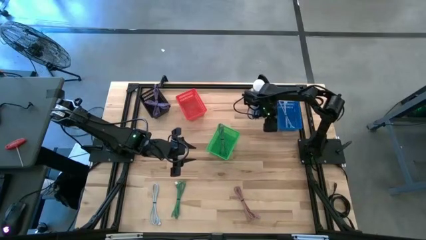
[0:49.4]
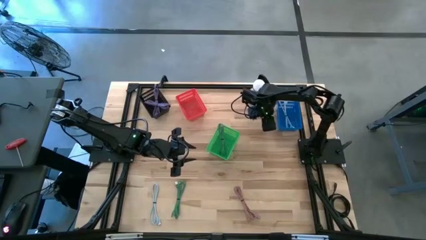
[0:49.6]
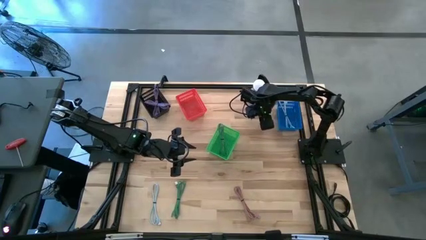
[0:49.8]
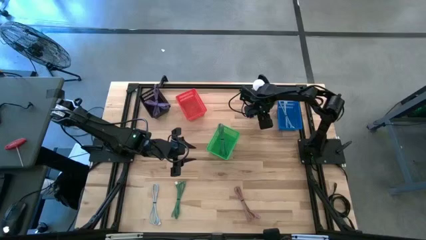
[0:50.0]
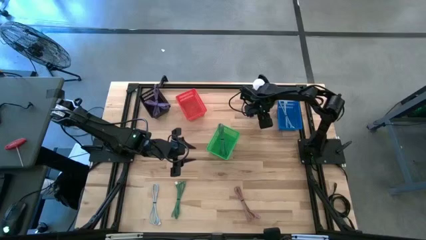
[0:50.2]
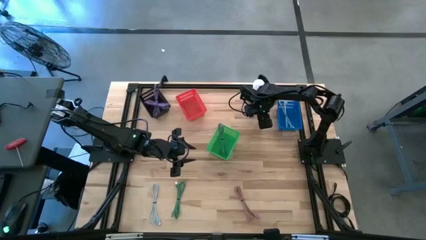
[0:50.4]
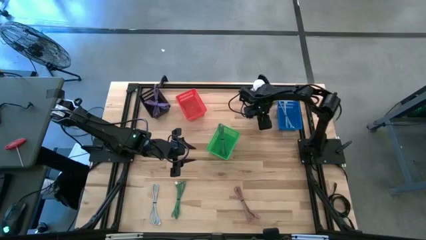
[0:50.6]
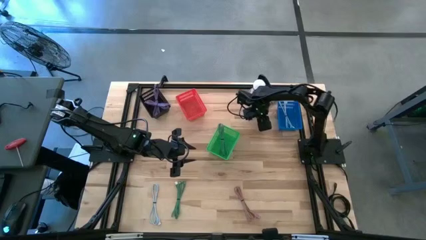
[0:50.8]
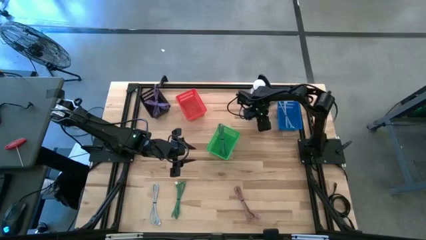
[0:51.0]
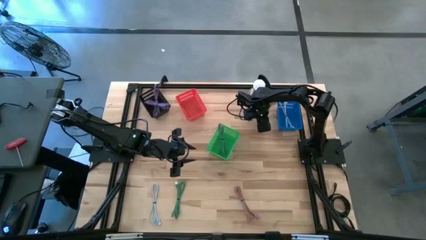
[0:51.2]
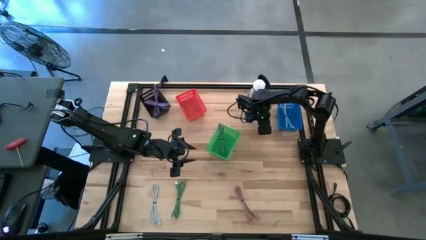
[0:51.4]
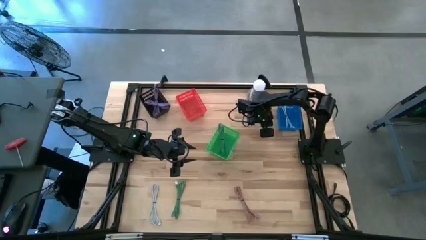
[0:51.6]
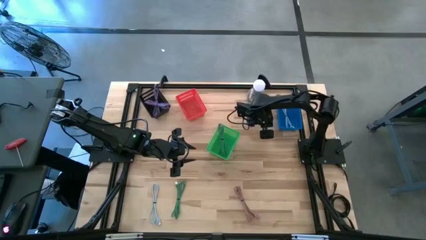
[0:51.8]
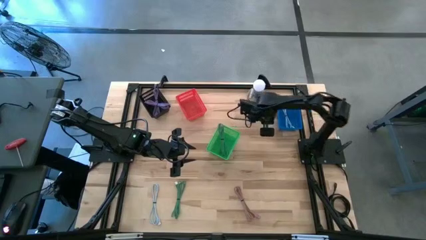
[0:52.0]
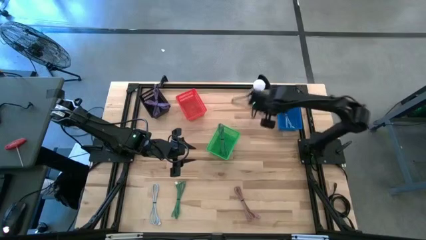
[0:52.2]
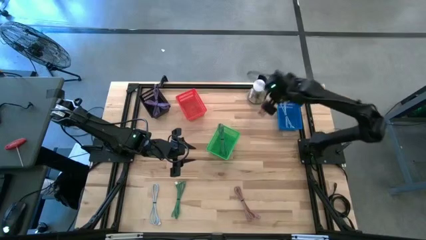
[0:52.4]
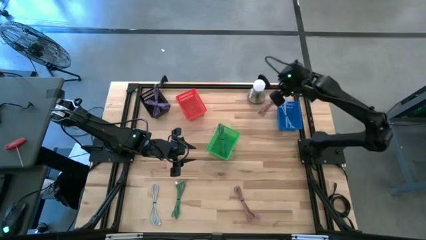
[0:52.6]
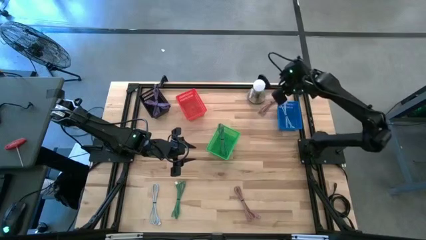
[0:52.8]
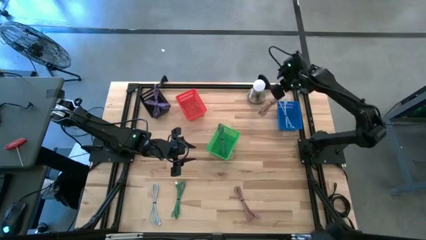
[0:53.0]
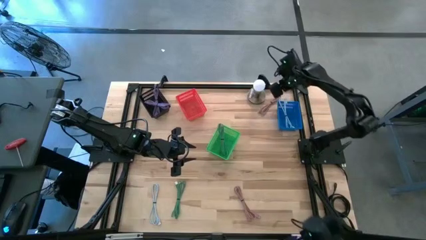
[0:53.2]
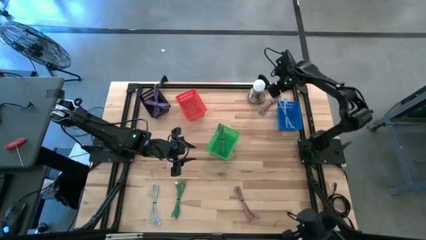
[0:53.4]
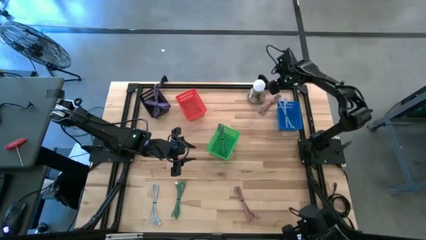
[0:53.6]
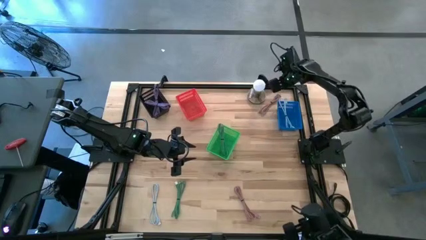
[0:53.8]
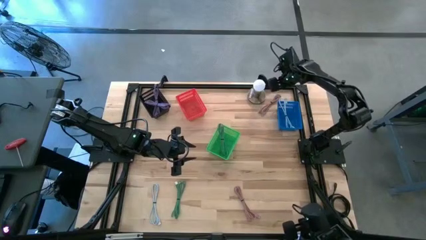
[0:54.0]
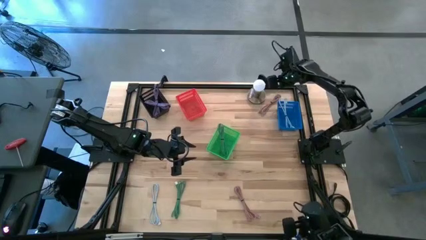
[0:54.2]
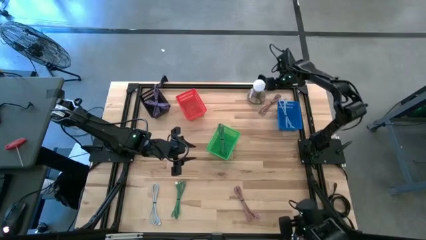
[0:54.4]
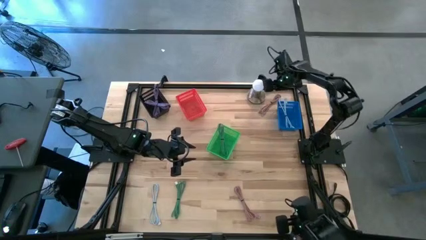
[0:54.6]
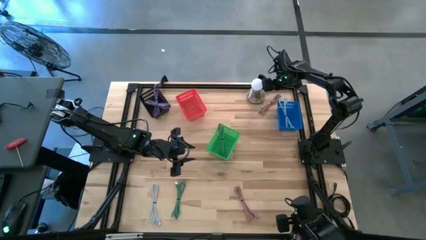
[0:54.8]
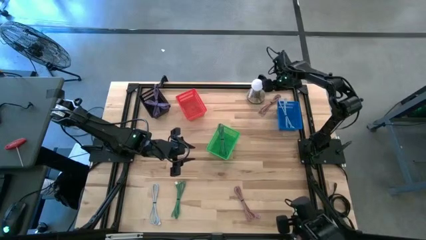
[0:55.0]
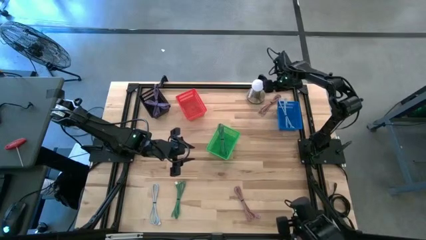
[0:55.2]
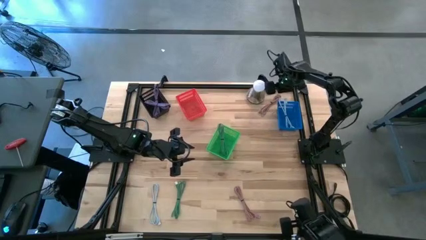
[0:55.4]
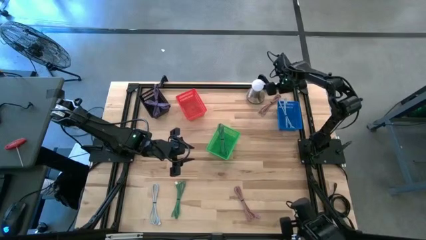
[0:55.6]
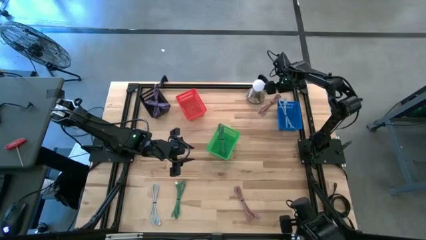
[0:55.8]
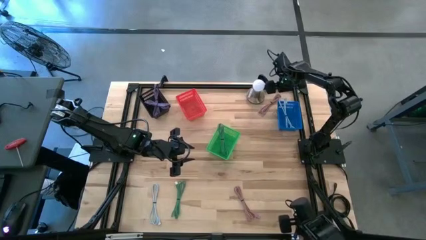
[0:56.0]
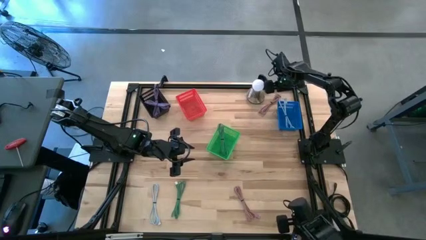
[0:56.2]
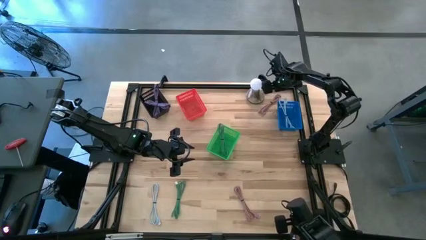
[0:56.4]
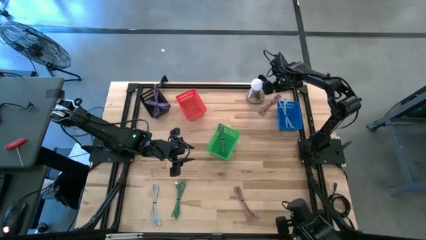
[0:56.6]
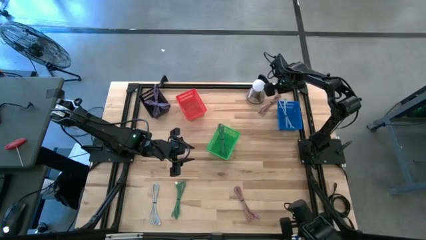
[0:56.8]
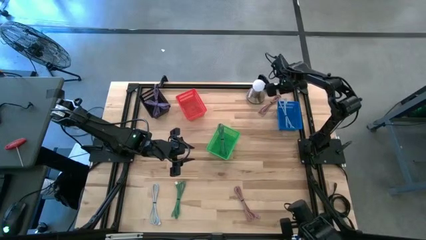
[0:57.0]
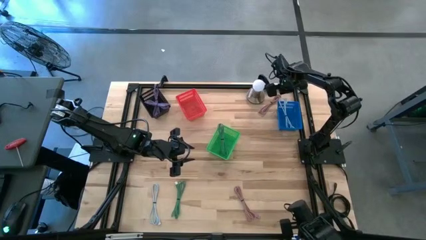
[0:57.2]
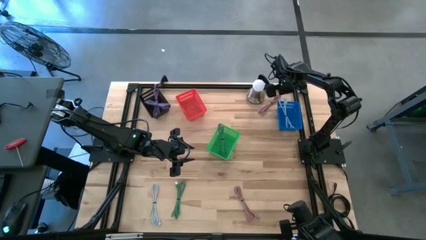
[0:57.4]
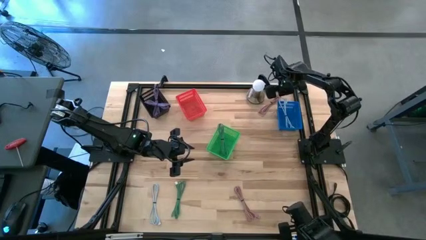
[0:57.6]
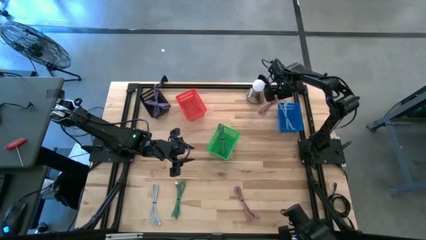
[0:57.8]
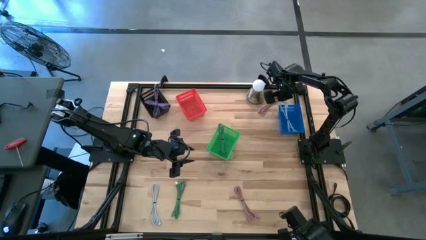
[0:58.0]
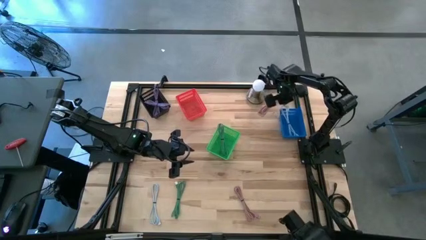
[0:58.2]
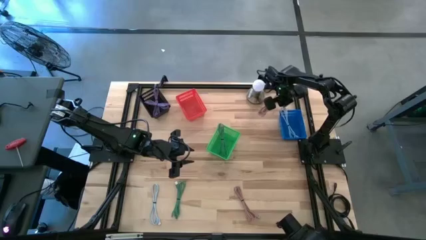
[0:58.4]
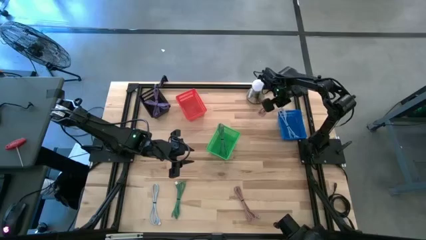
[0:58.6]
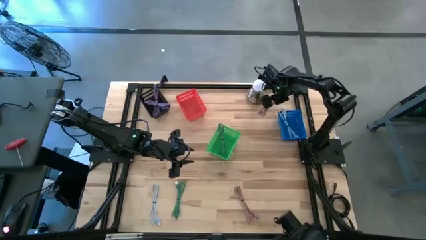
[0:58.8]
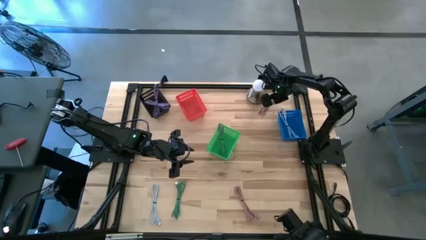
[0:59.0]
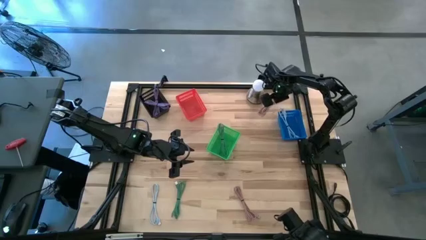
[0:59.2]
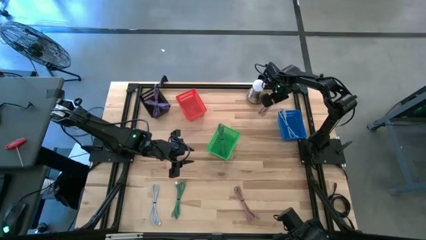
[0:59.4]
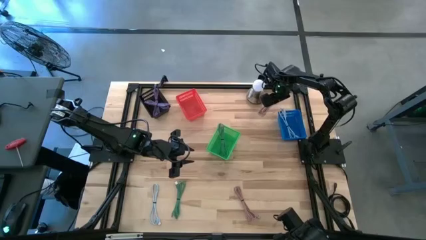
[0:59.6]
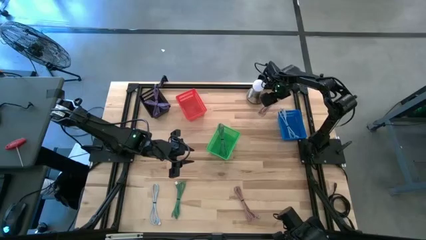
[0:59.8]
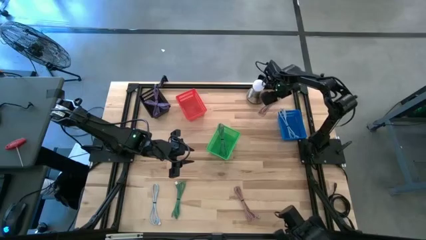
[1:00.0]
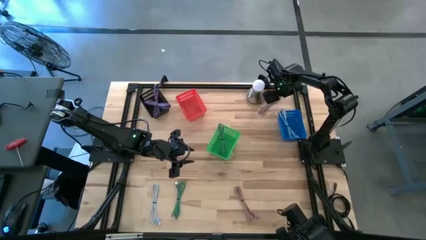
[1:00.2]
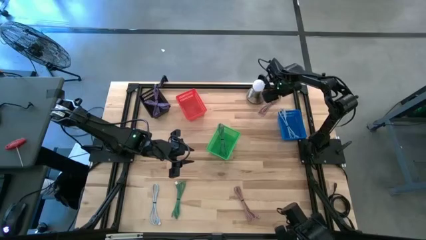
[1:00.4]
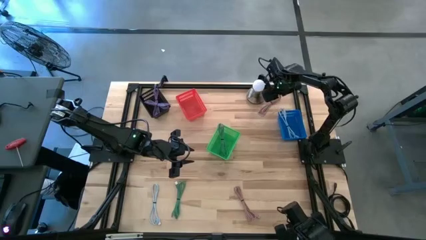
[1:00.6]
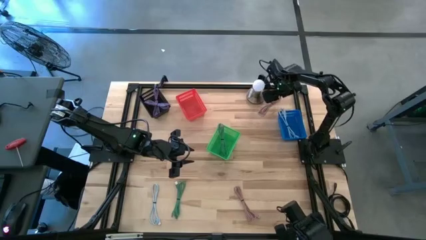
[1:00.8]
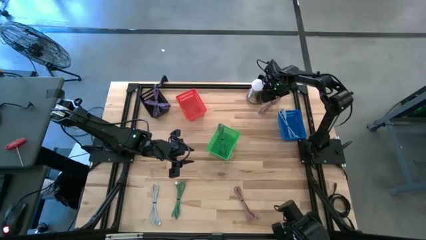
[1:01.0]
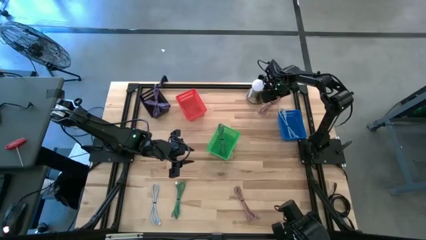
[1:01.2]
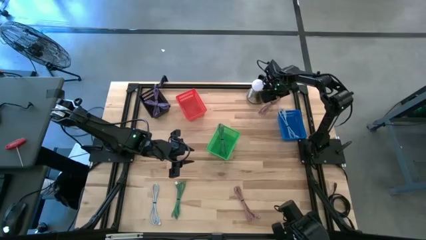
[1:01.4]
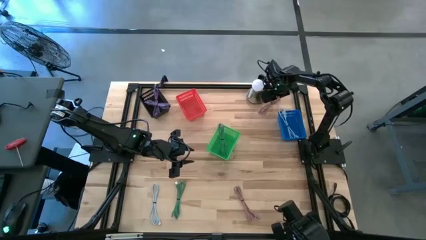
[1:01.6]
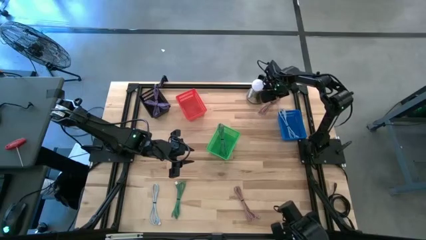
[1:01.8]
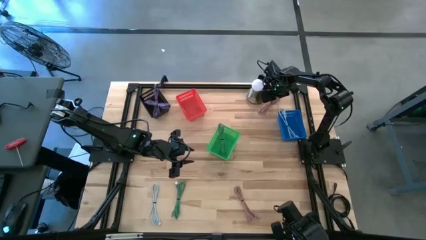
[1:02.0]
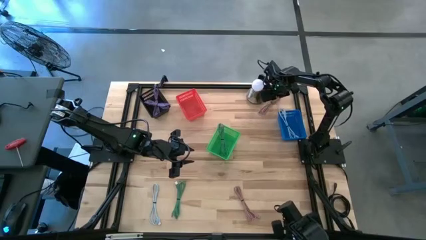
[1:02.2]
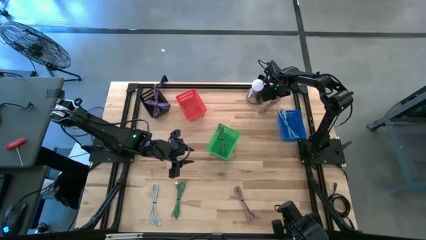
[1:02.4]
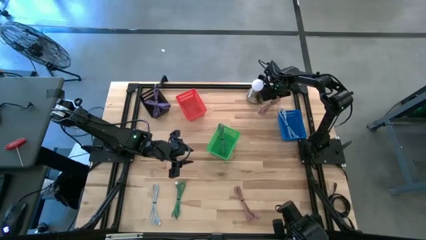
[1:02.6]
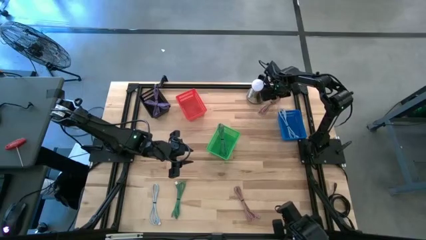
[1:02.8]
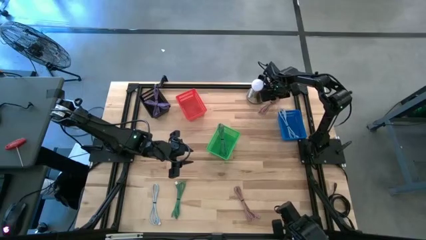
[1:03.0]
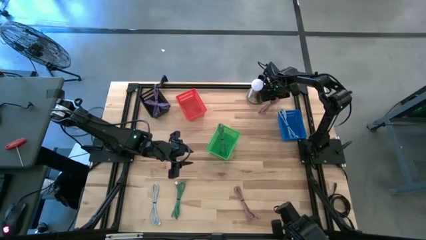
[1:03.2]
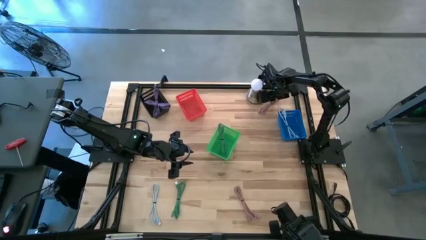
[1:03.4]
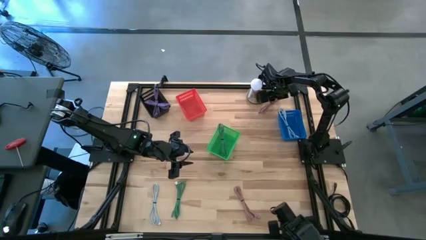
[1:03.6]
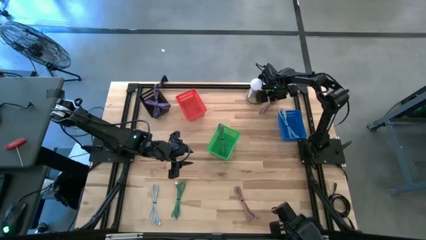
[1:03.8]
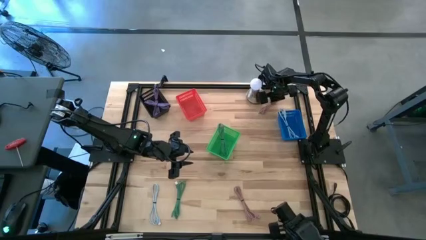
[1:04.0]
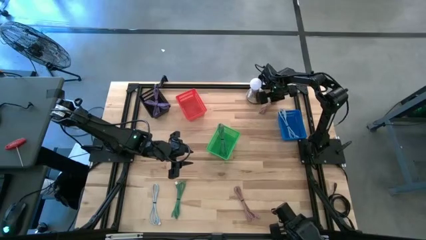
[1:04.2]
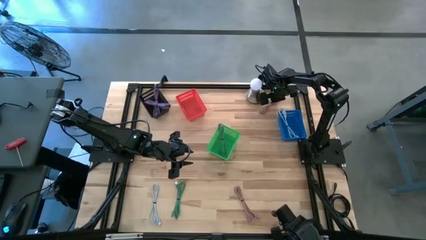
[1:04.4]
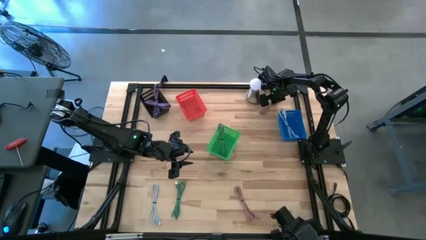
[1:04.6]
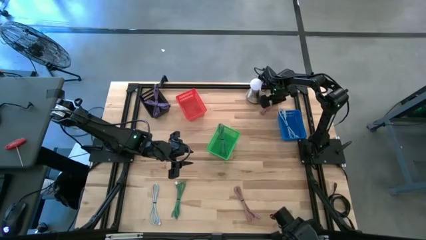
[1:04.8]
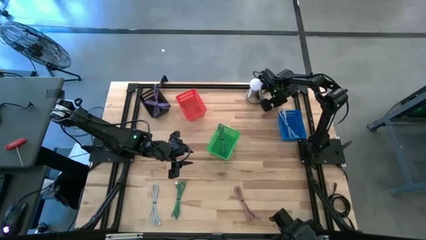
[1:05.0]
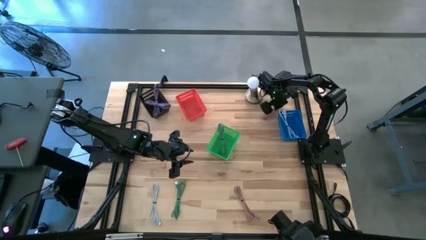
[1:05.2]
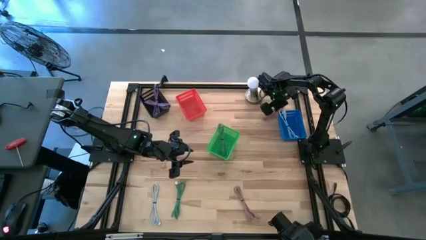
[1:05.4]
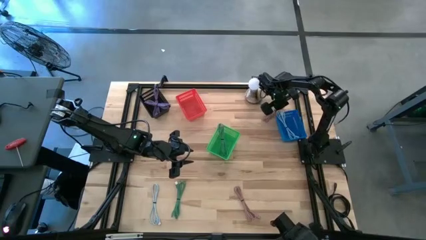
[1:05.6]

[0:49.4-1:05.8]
Task: Pick & Place USB Port
Put the top pink charger cable into the red basket
